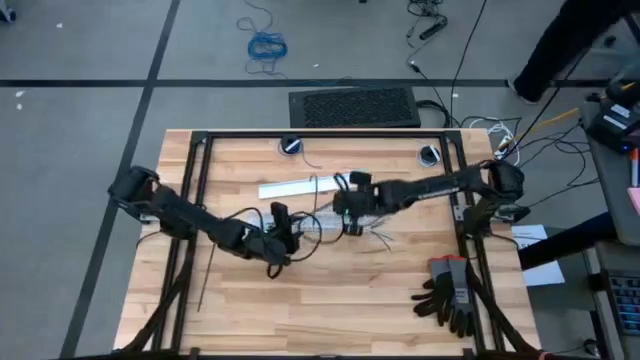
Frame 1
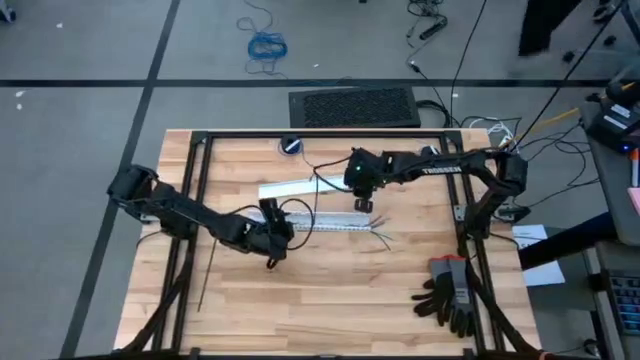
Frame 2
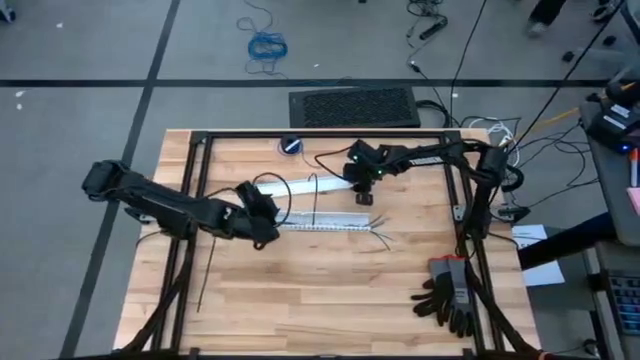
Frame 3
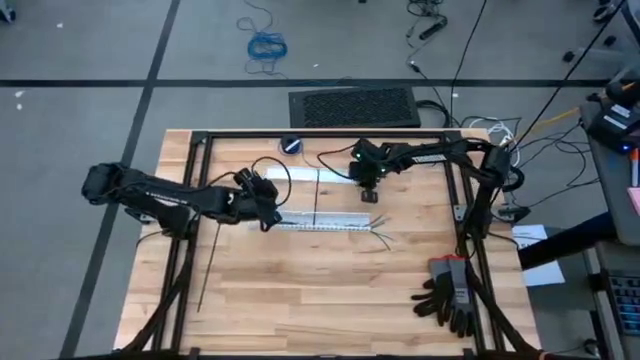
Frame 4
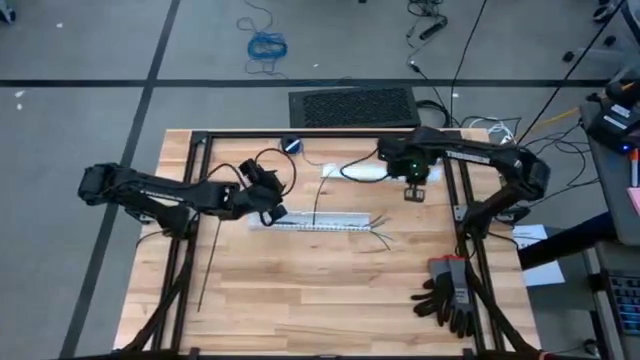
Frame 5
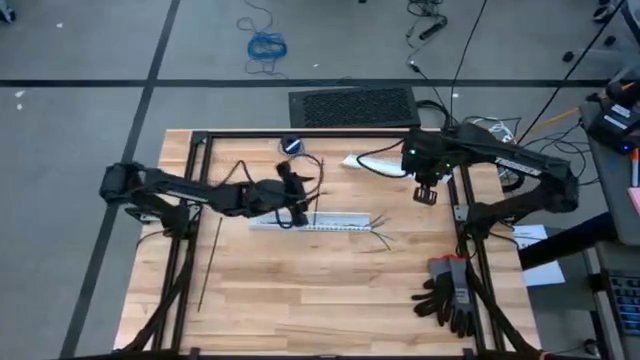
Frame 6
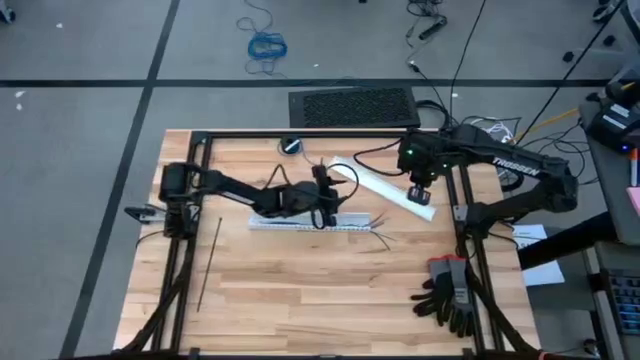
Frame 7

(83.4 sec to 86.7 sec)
Task: Ziptie cables
Close the cable duct

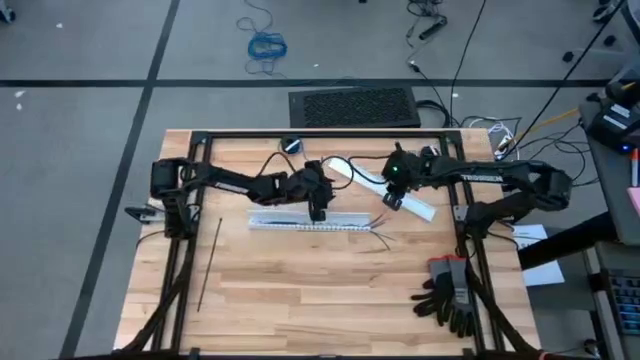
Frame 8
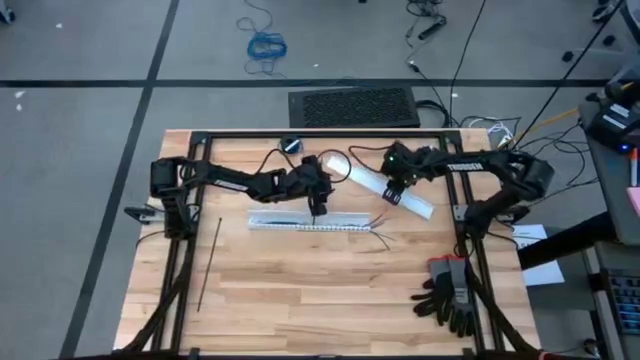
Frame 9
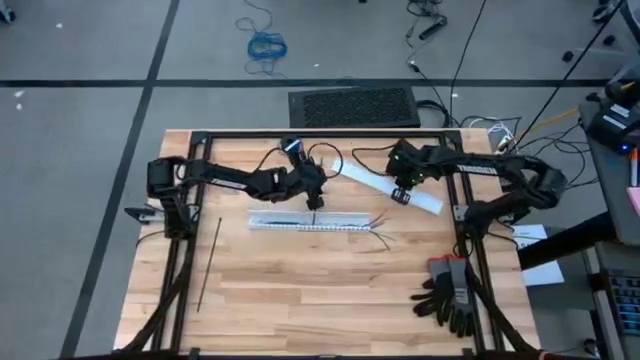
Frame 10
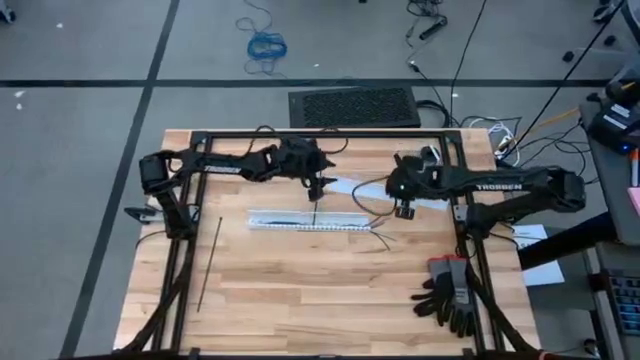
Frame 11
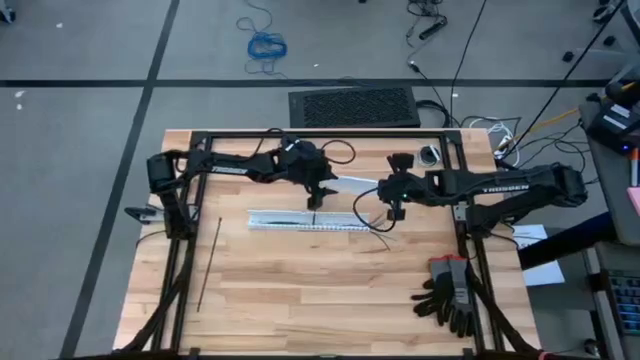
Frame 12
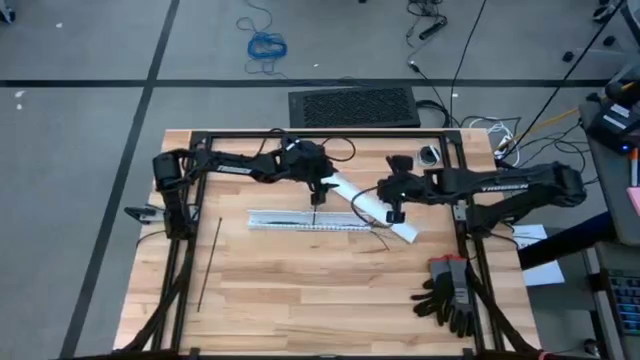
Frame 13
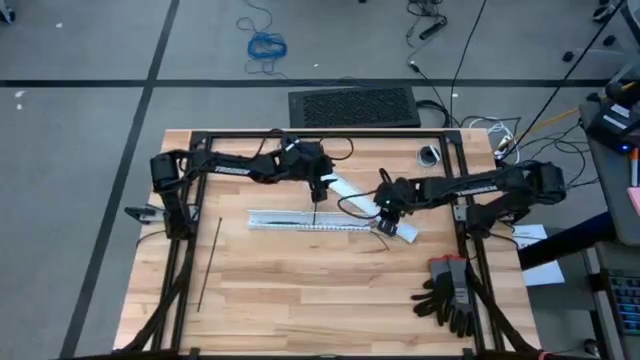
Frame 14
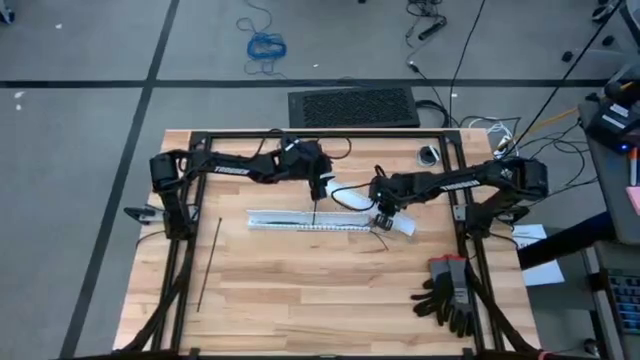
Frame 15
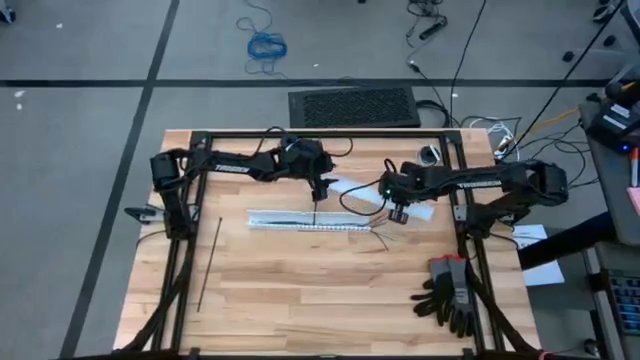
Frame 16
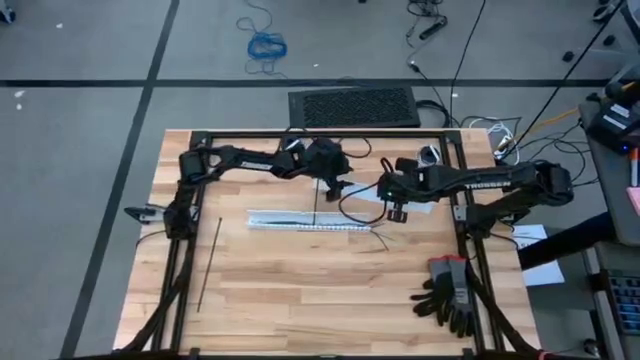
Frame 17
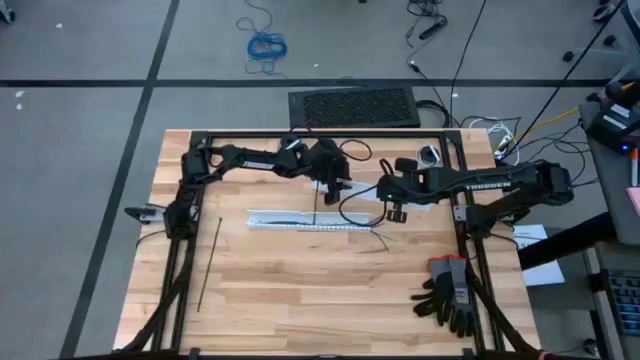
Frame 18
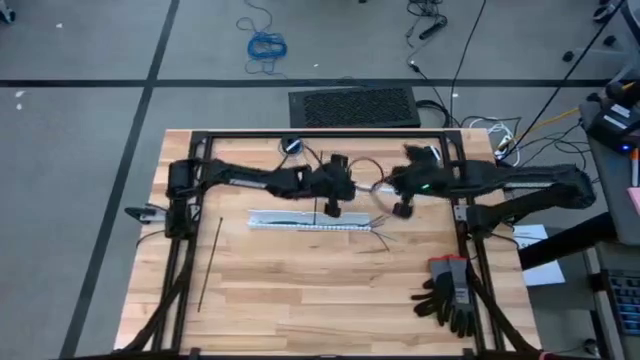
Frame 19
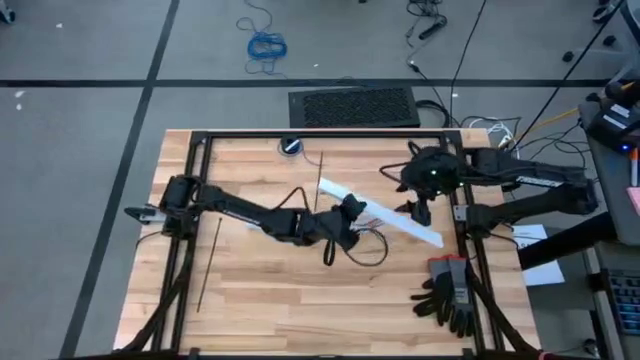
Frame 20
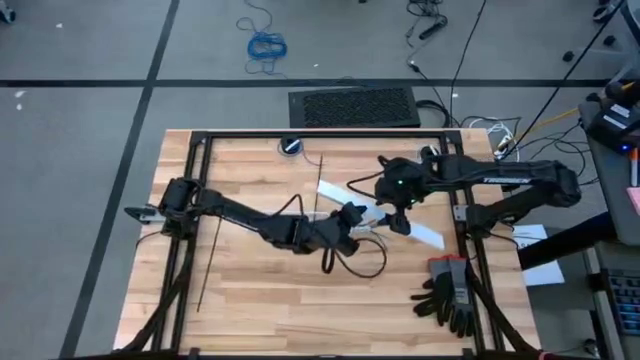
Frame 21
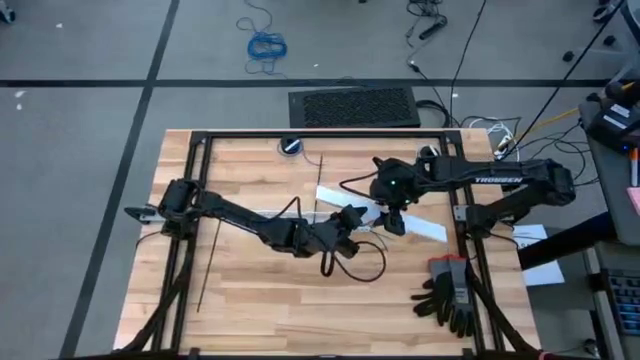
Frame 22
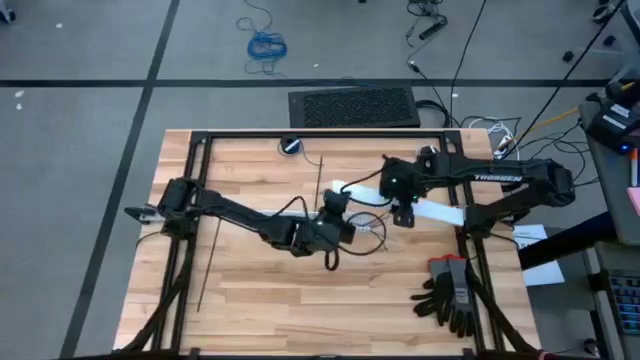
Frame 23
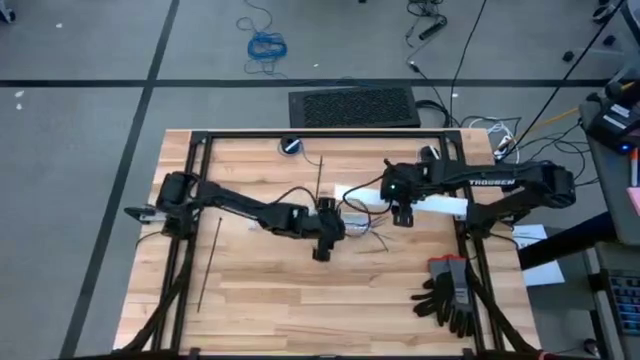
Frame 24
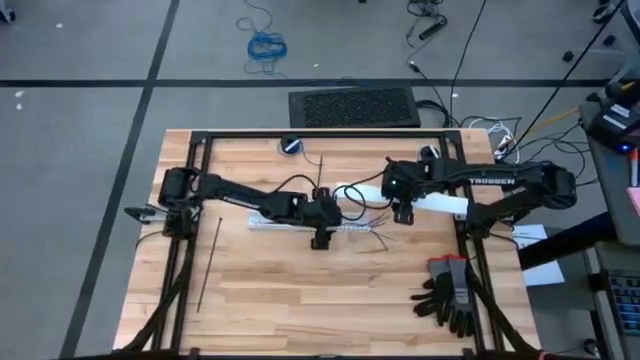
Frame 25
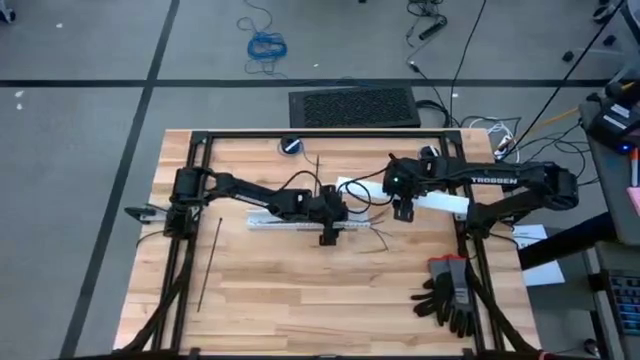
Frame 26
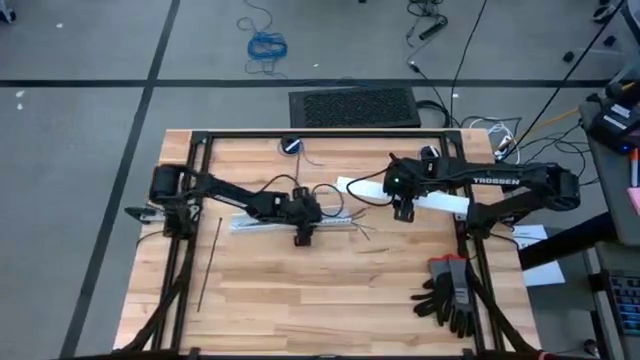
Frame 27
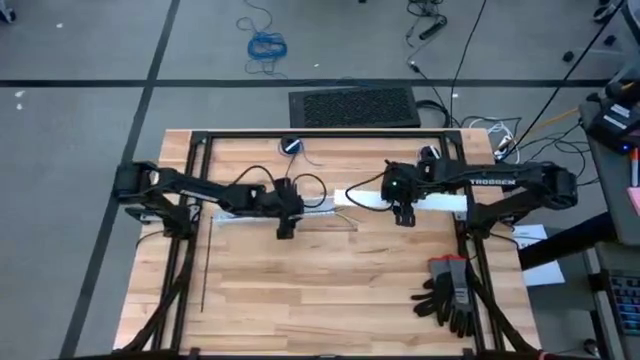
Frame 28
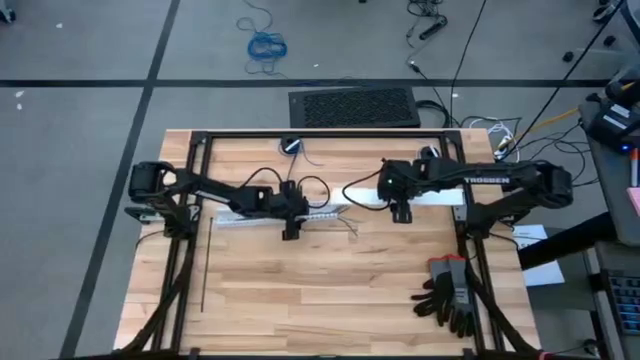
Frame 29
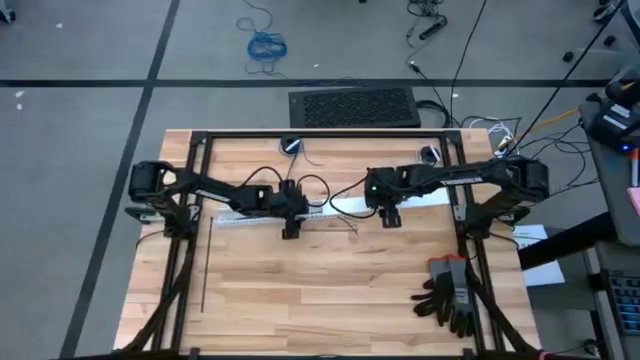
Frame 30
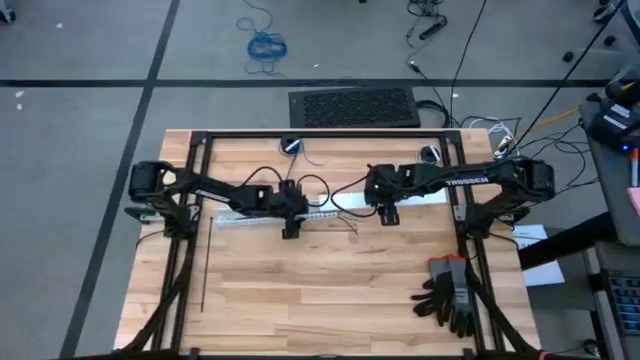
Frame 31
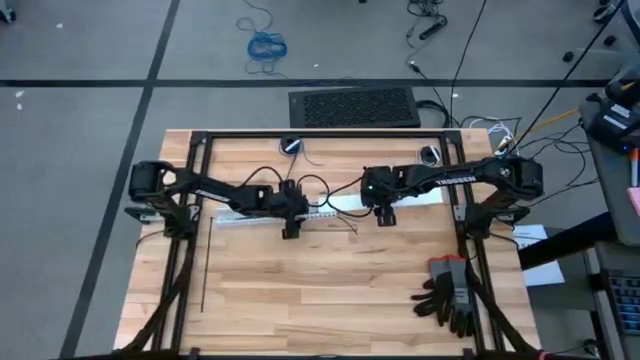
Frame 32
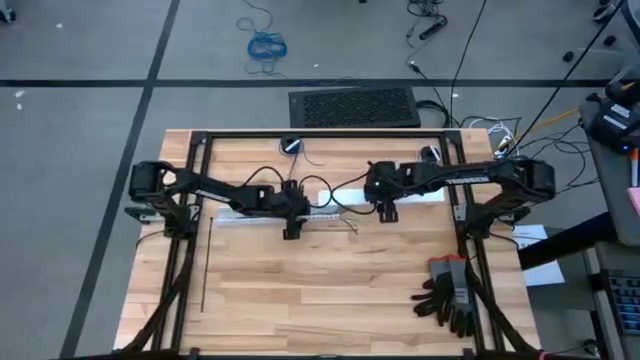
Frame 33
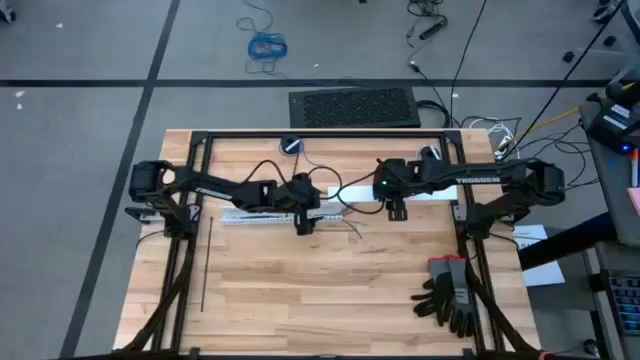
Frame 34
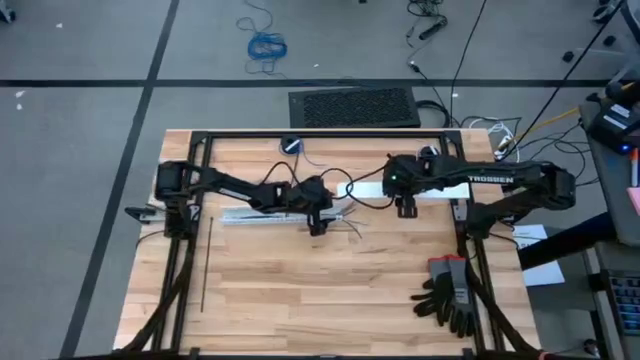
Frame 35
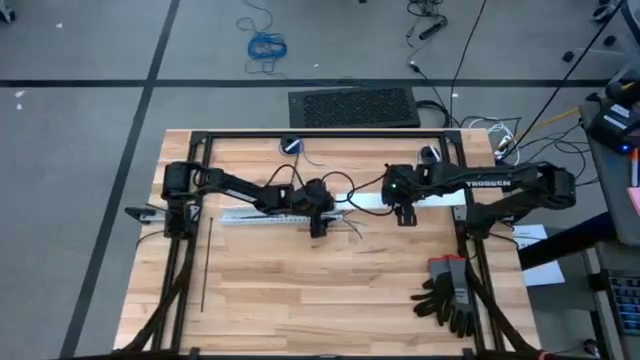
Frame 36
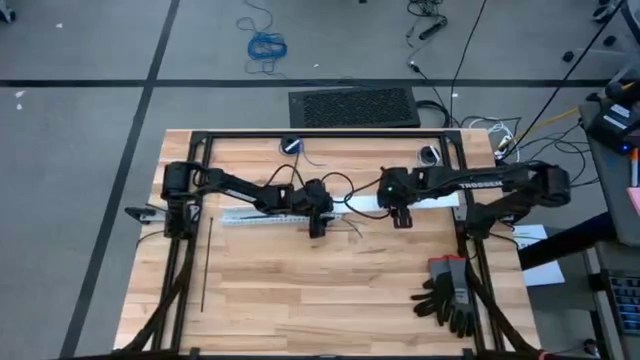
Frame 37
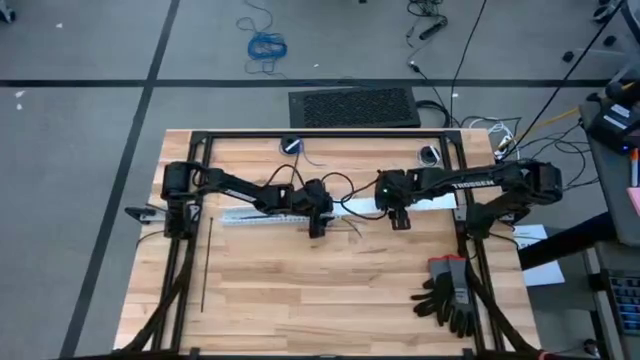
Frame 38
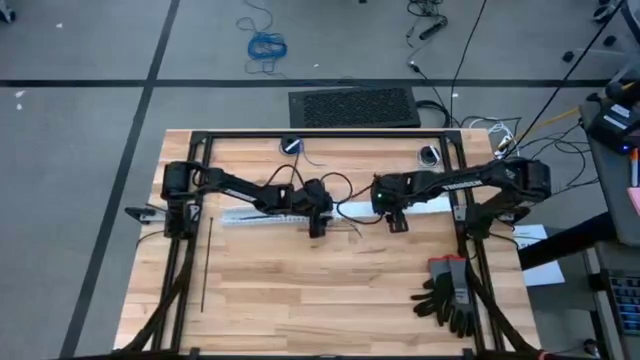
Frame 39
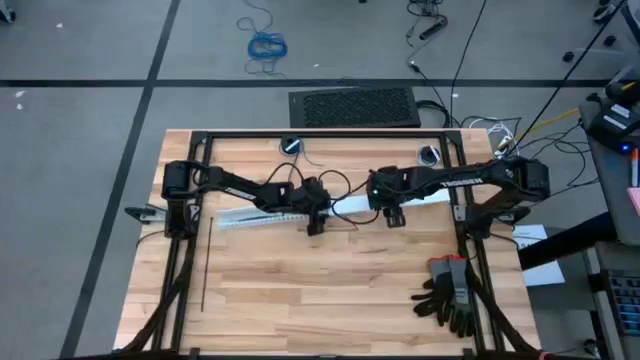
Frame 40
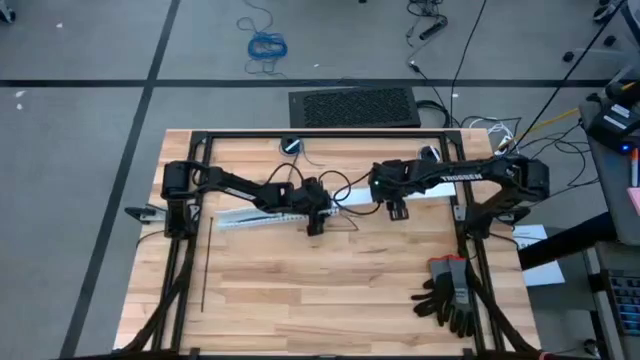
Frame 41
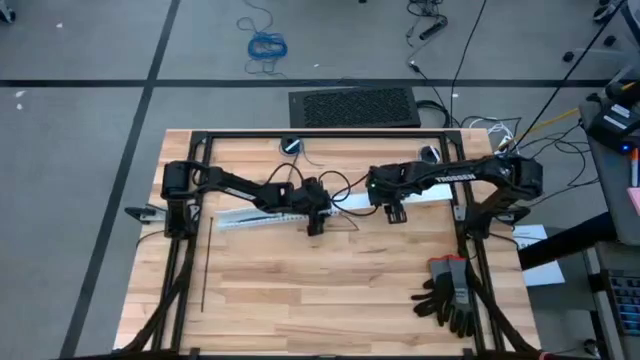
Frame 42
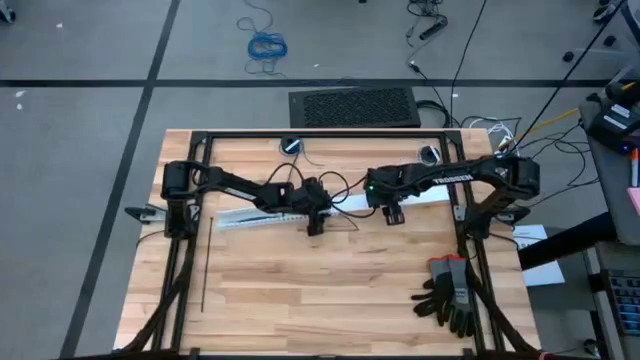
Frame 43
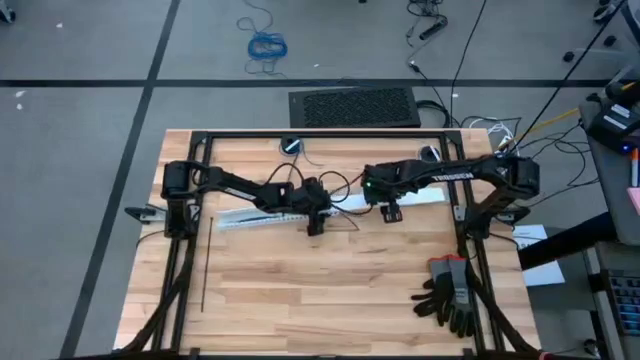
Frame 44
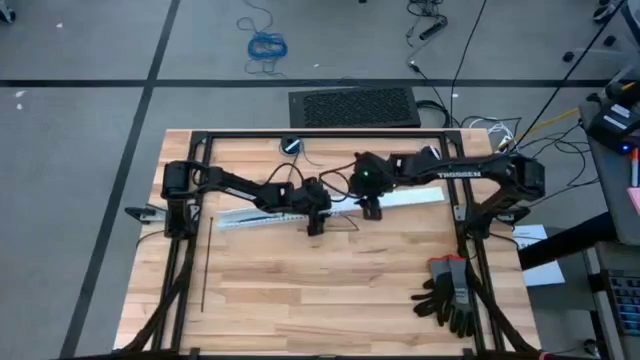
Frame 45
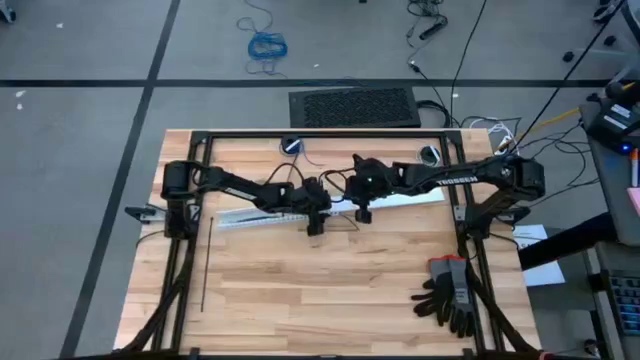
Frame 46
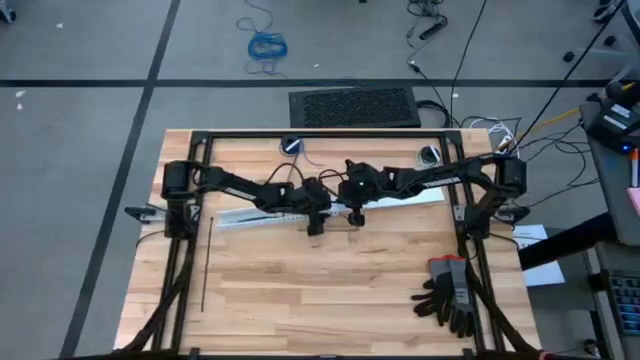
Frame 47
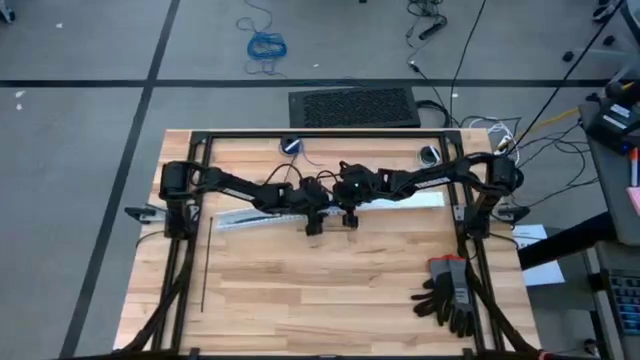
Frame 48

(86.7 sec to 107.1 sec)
Close the cable duct
